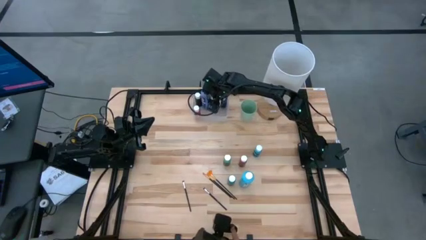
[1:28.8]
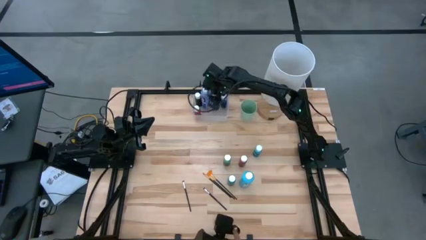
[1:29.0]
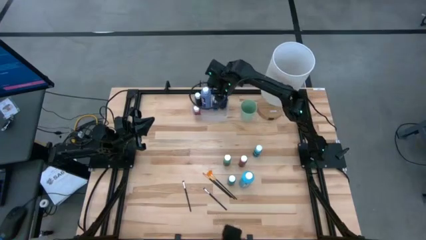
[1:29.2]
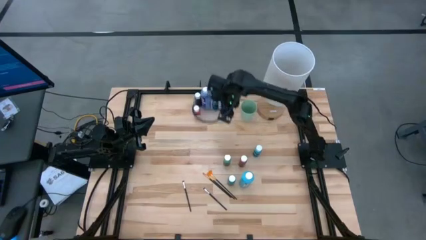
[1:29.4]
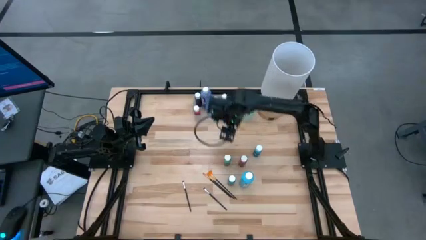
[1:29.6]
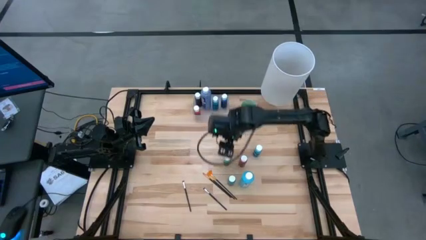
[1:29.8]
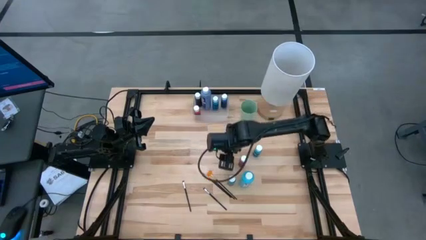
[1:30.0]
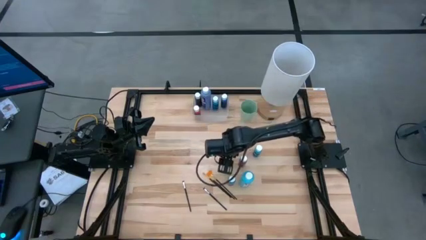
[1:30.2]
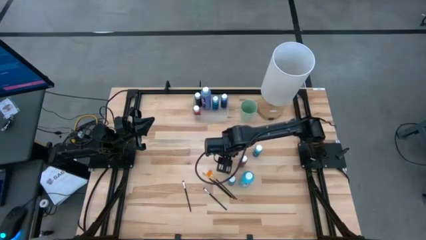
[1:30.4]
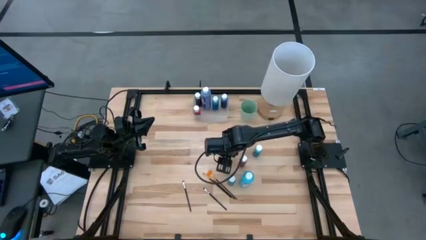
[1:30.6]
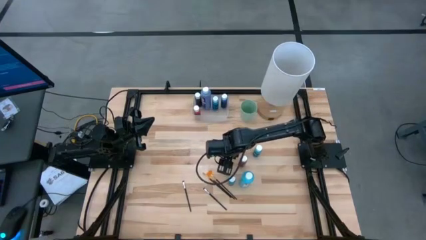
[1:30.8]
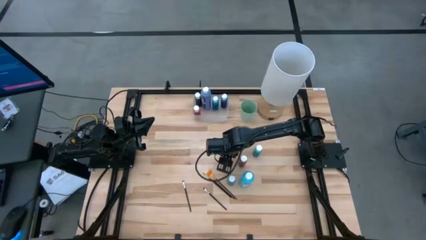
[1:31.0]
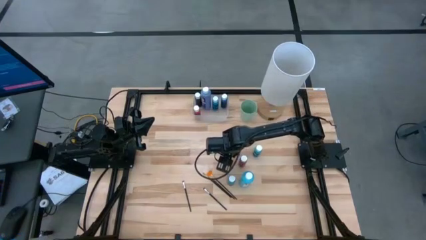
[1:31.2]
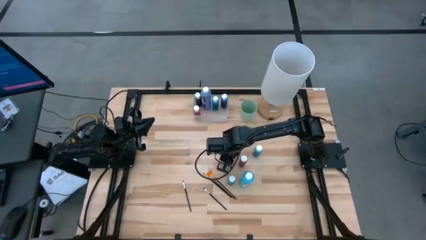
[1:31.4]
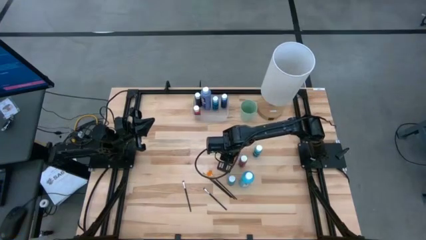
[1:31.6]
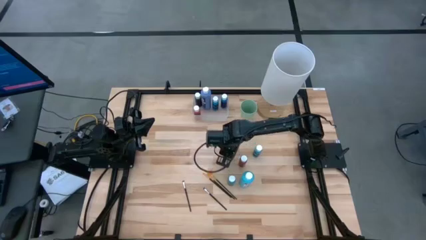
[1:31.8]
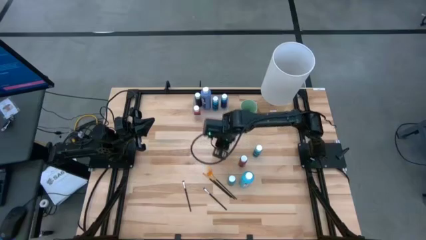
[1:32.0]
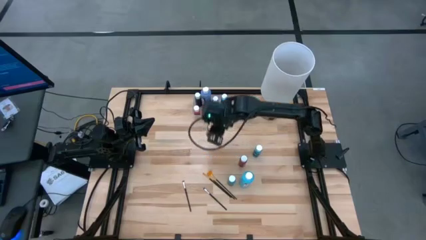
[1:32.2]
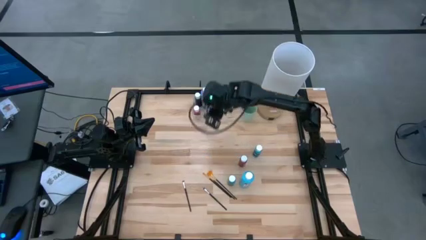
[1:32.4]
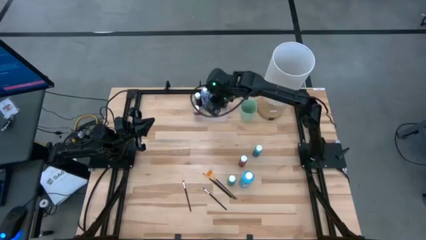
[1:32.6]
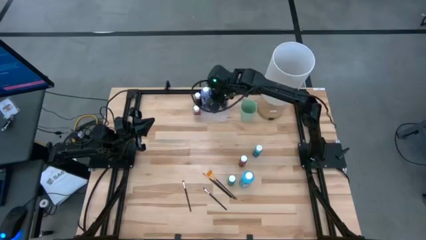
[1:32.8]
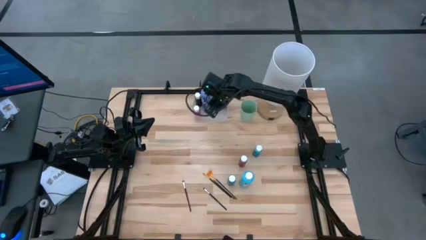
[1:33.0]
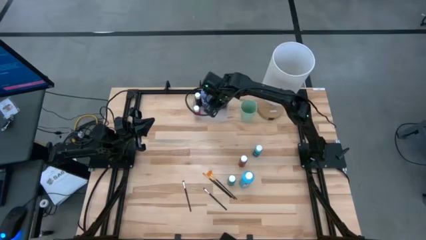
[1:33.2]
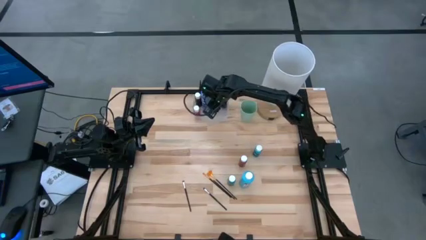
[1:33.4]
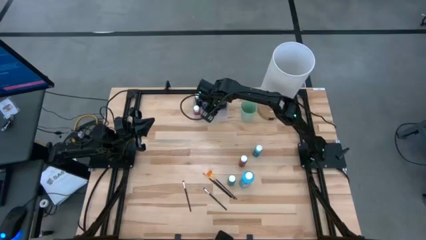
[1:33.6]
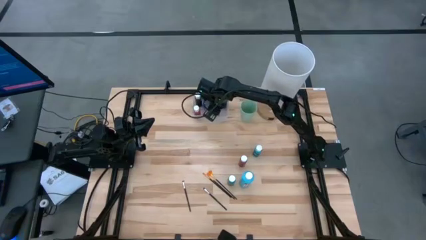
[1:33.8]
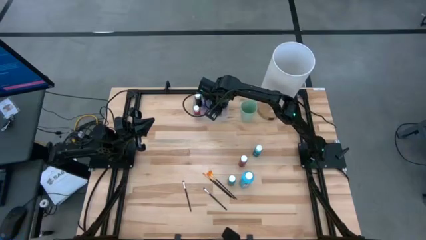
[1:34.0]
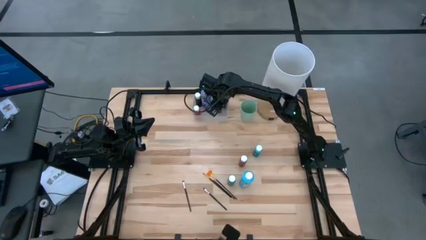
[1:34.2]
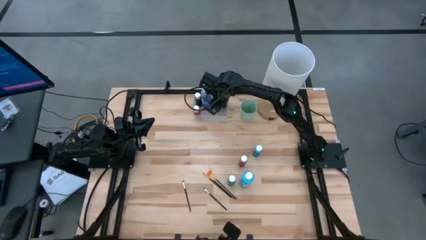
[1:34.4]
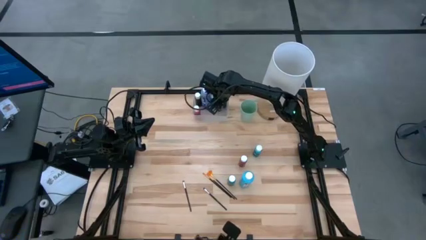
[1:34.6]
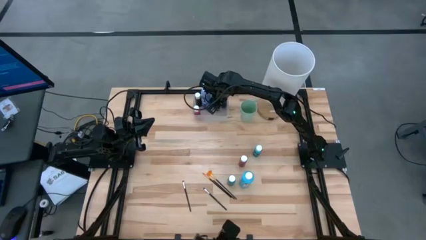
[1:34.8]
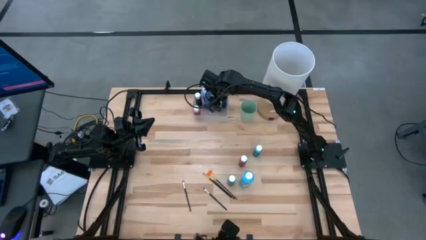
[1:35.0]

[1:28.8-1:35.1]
Task: Pick & Place Paint Supplies
Put the small top green paint bottle into the transparent bin

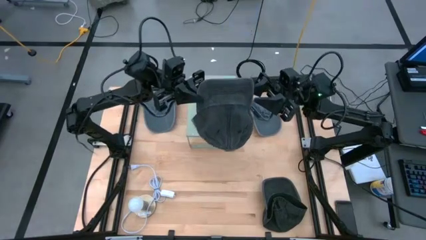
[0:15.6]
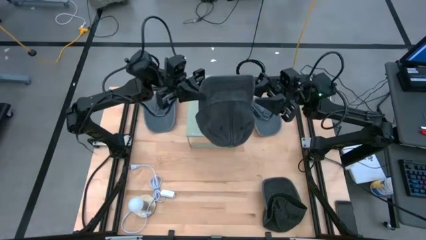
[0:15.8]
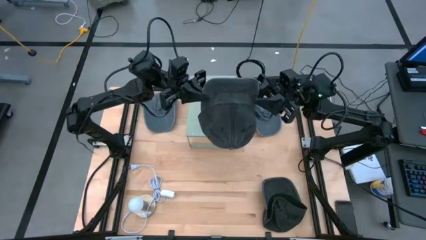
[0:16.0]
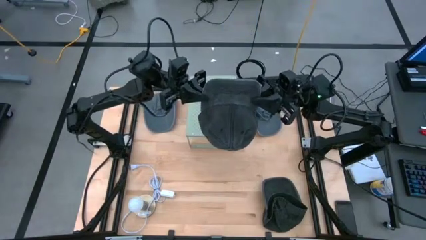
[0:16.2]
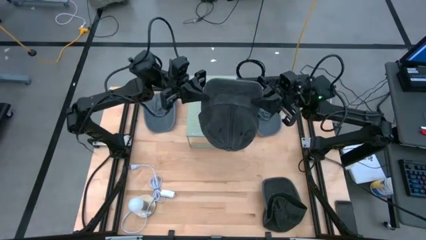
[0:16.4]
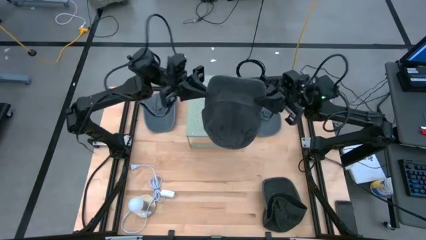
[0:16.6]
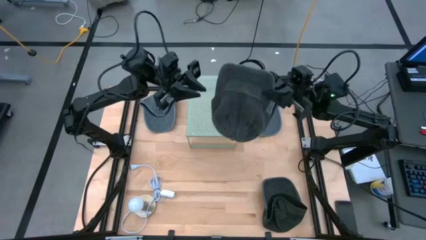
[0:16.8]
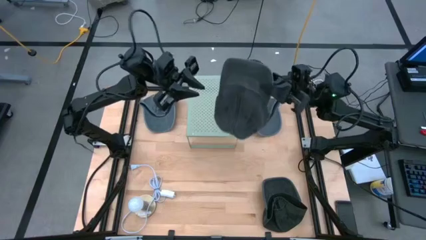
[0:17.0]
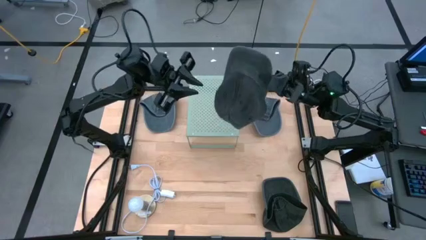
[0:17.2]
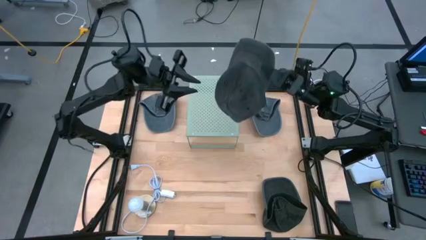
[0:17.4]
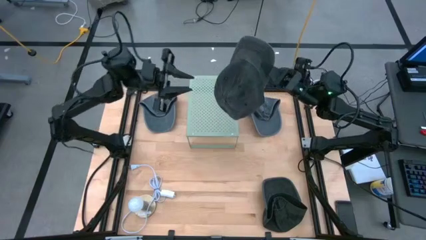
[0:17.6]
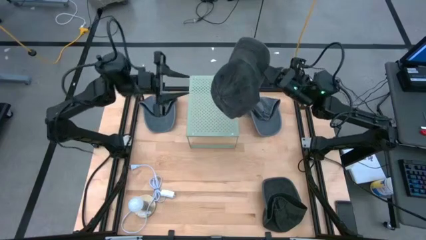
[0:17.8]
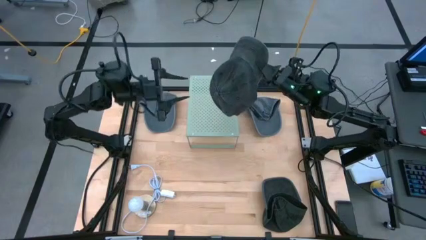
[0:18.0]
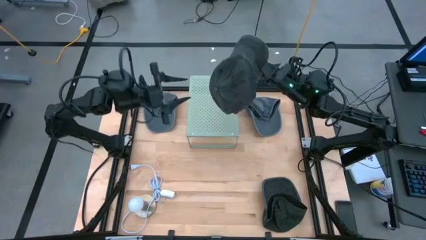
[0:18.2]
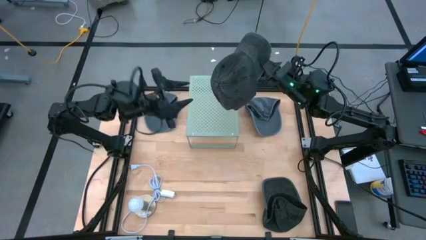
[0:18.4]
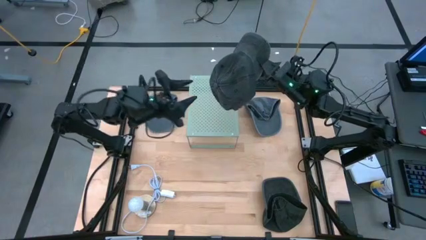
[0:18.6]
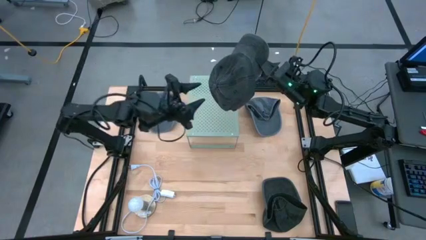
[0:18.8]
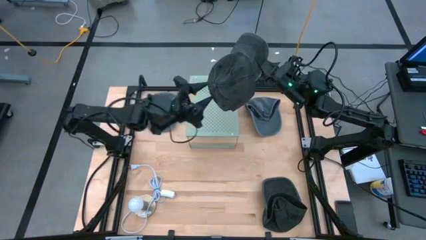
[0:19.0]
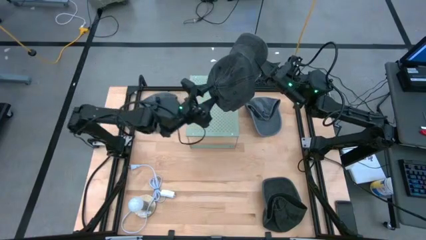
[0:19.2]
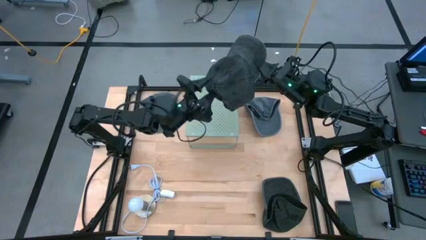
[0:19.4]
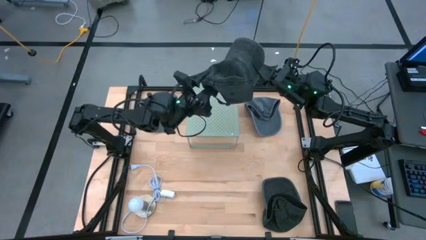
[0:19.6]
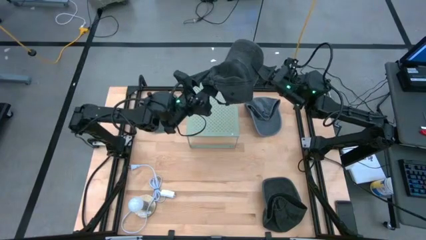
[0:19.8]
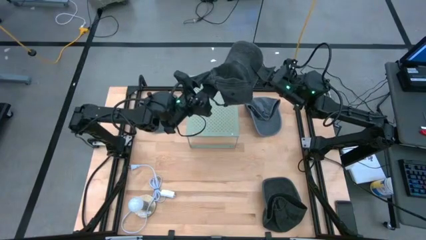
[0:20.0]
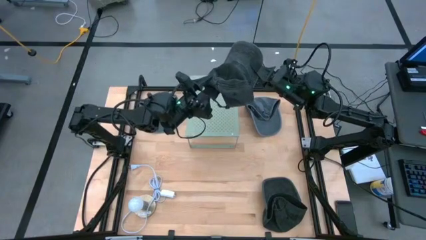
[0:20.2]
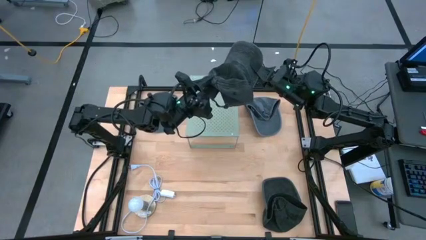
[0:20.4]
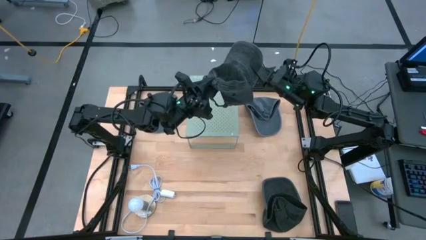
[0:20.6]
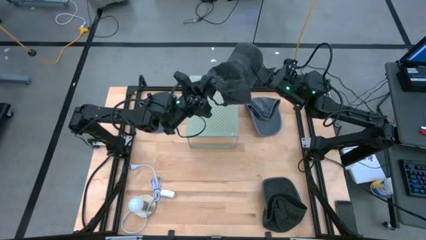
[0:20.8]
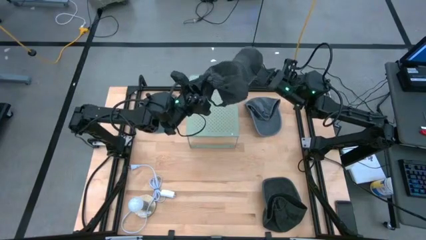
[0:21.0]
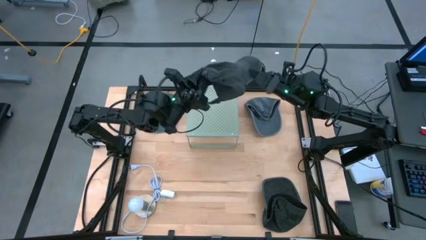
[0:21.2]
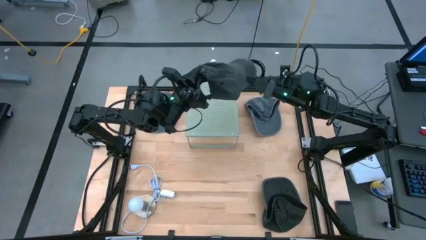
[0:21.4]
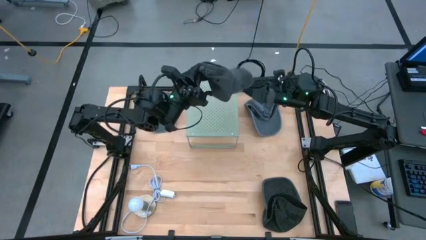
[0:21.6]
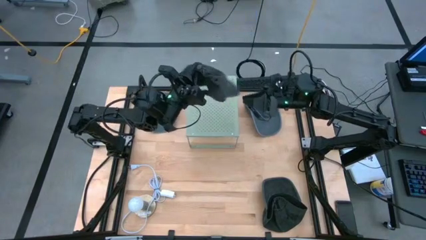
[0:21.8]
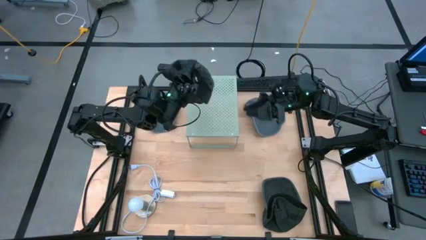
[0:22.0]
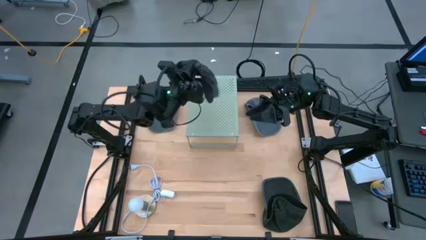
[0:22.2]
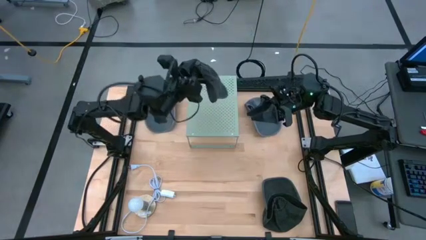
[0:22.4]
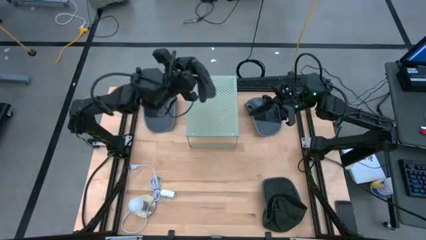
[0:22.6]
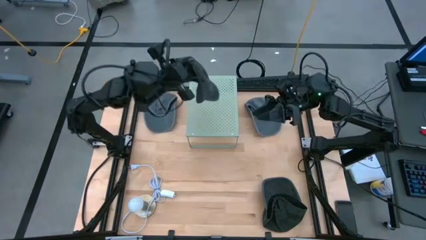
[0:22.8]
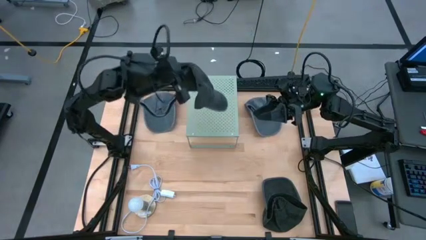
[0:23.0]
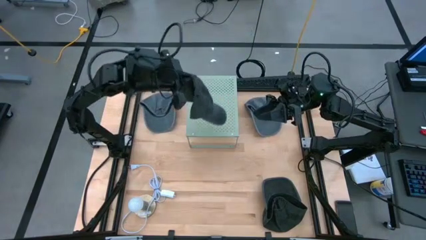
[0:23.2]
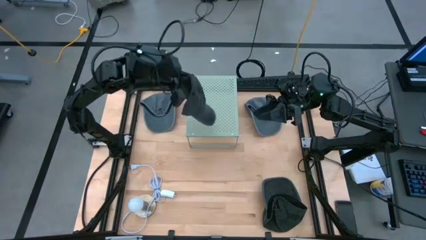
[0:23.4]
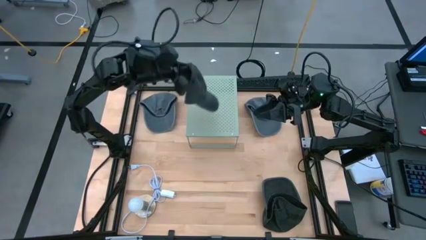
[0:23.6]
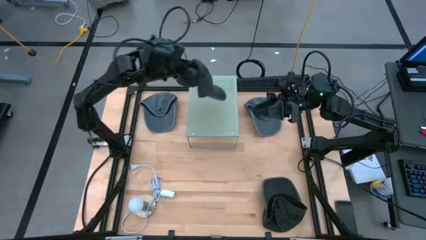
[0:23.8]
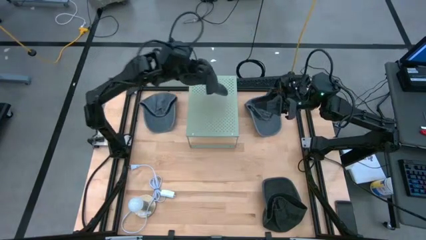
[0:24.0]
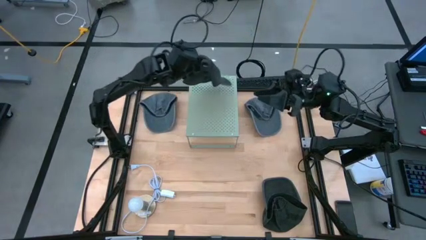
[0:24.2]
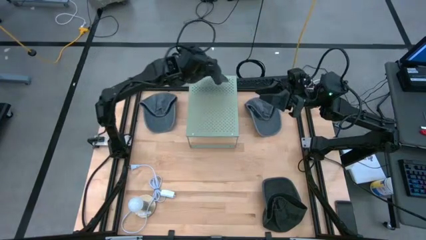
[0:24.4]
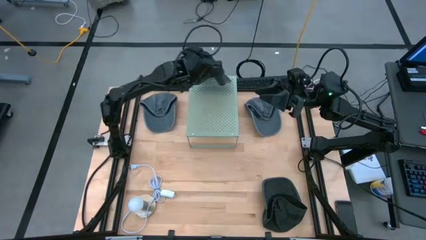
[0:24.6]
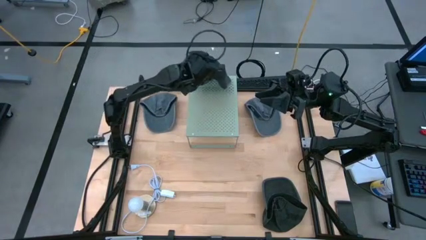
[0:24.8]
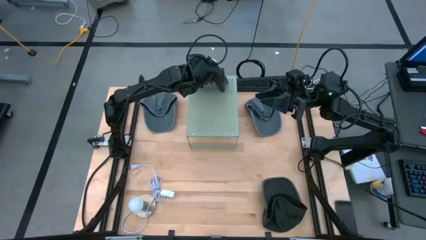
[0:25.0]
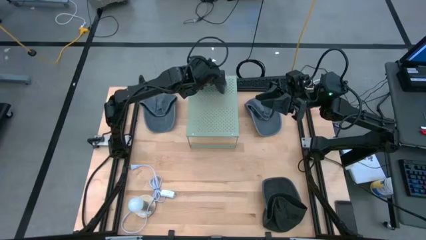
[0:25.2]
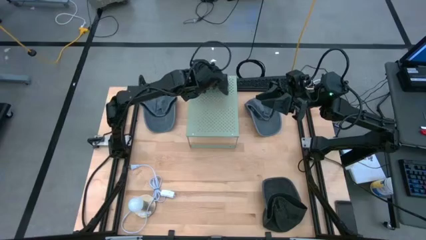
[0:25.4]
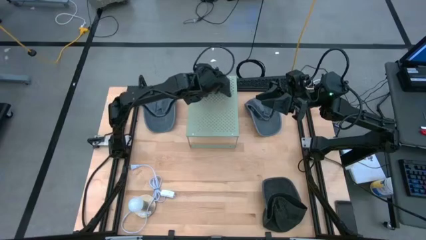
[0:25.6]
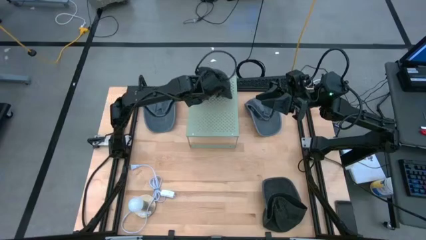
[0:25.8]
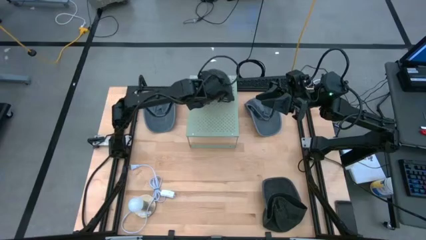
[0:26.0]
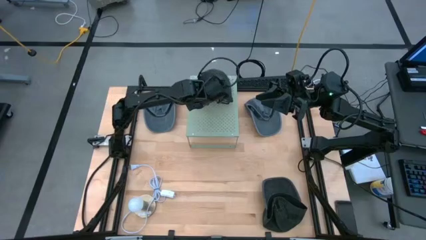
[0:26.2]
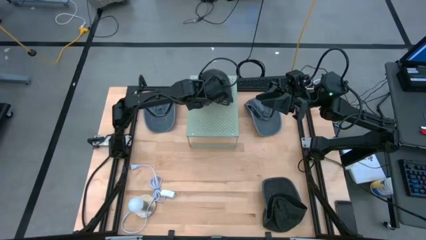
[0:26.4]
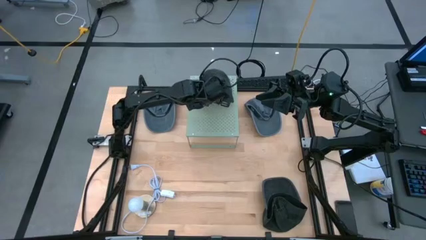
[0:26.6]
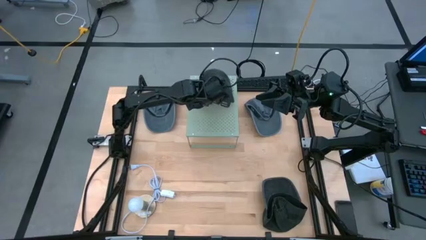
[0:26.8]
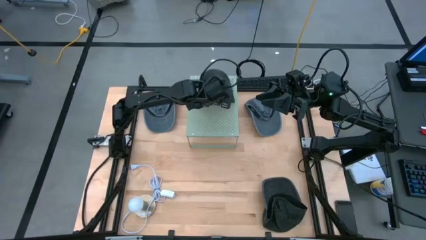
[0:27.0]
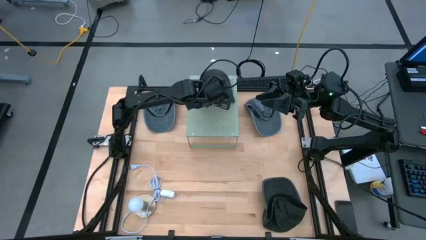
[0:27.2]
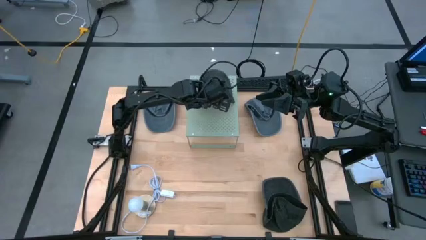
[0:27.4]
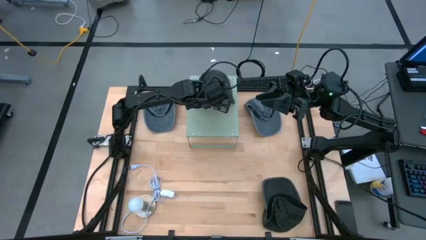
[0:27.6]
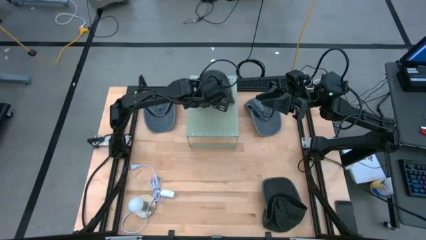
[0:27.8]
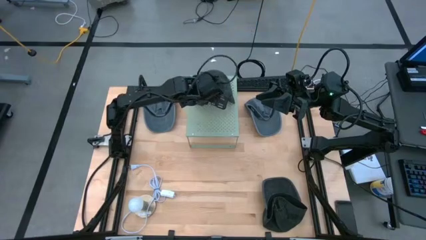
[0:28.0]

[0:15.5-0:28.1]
Task: Pick & Place hat
Put the left black cap on the shelf
